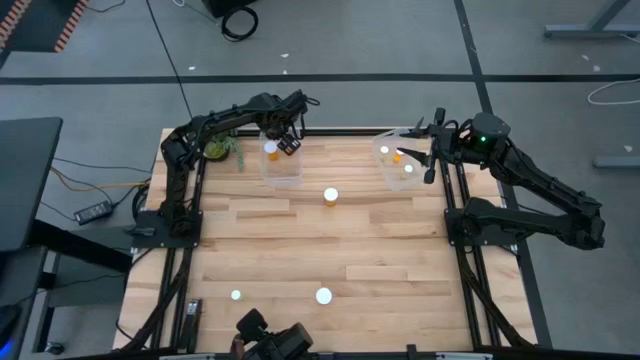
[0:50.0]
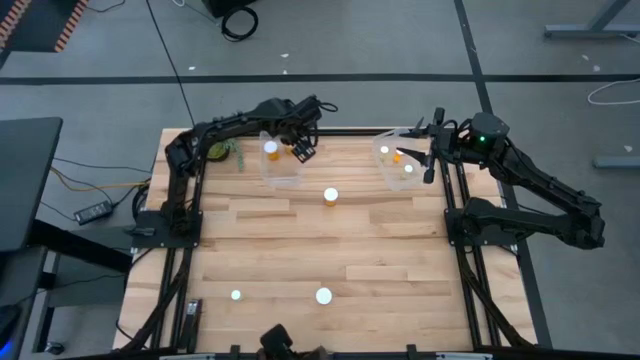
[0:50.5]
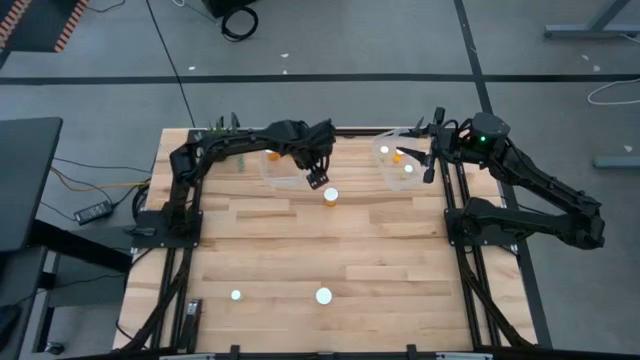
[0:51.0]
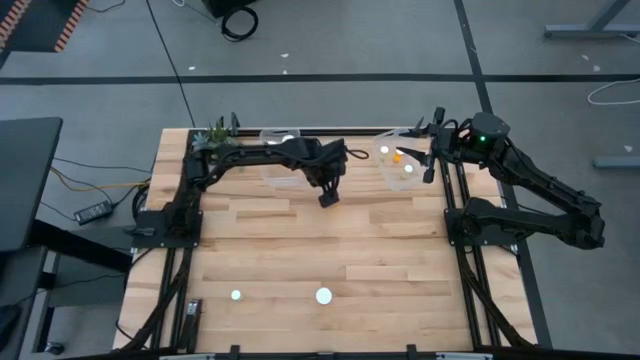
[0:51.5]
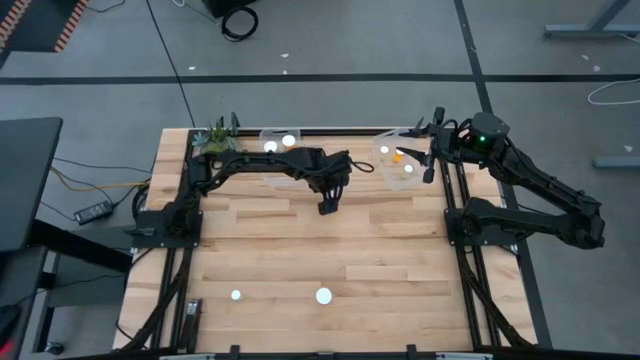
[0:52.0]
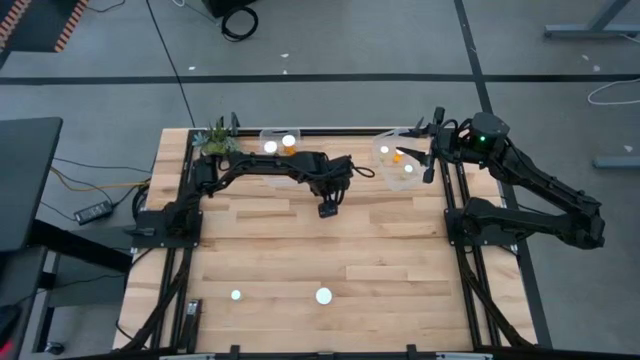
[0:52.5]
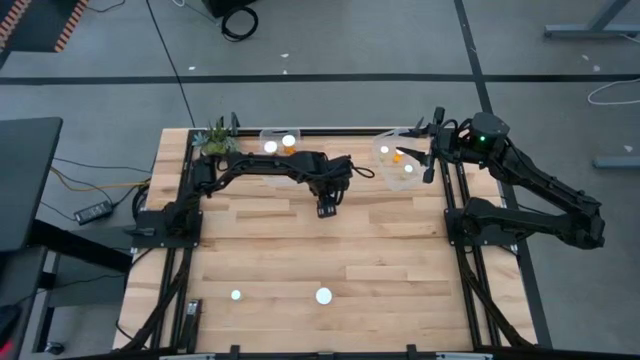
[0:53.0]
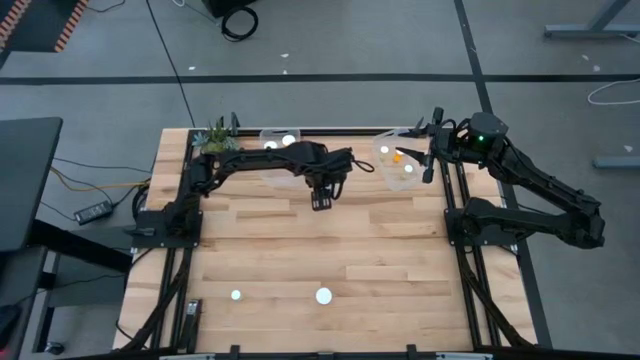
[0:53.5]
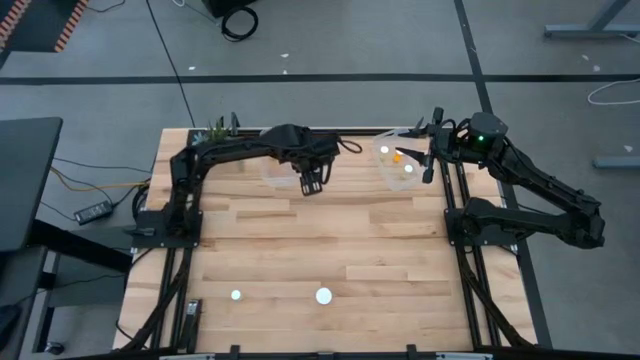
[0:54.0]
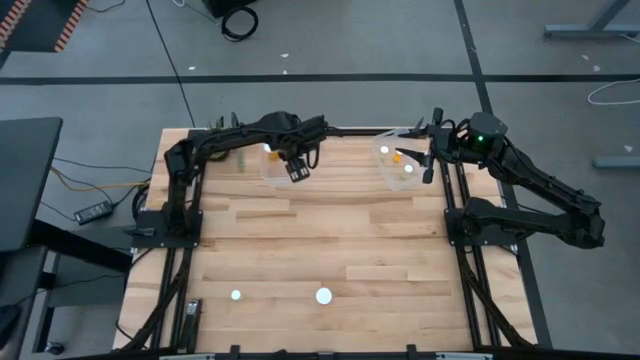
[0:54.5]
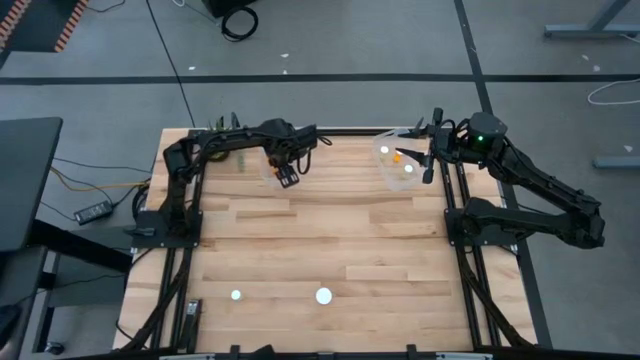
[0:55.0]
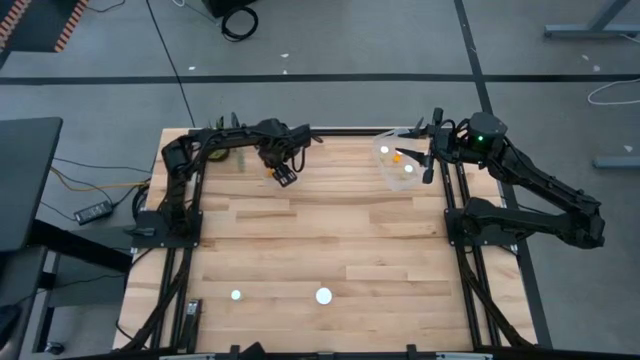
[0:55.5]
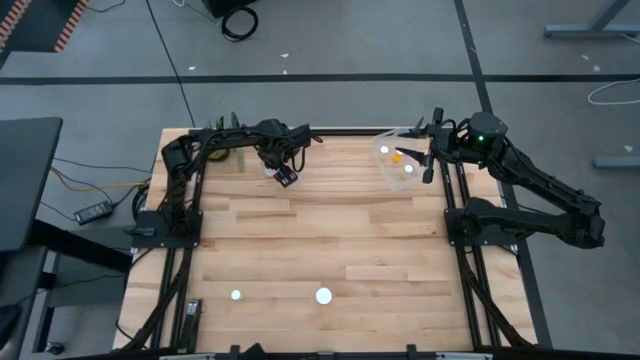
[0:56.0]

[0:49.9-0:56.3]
Task: Pick and place medicine bottles into bin by pill shape (circle, oval)
Put the big pill bottle into the left transparent bin

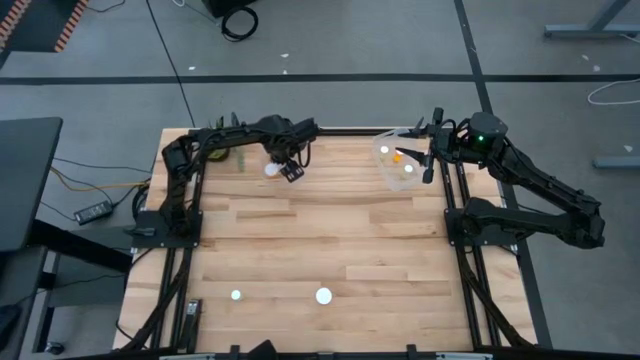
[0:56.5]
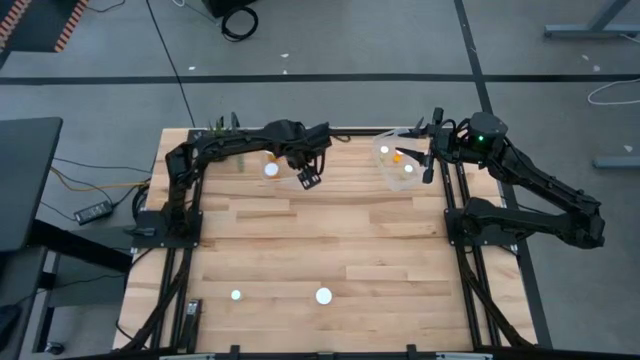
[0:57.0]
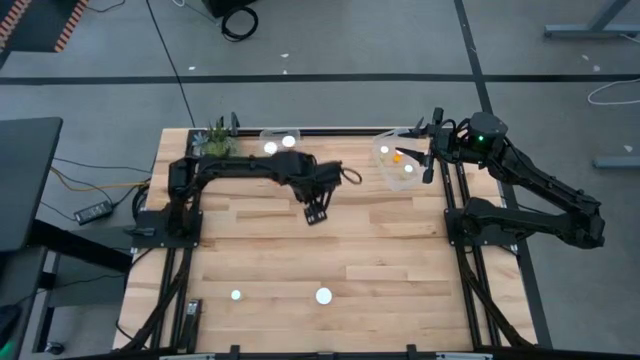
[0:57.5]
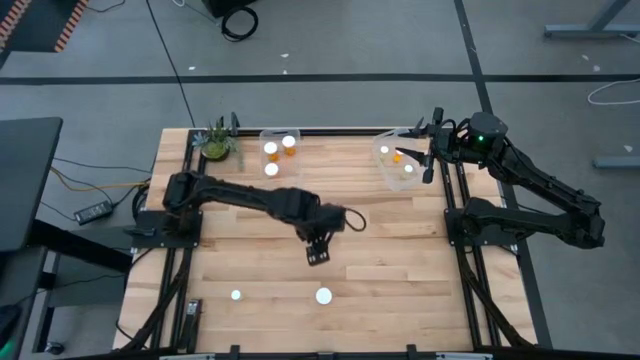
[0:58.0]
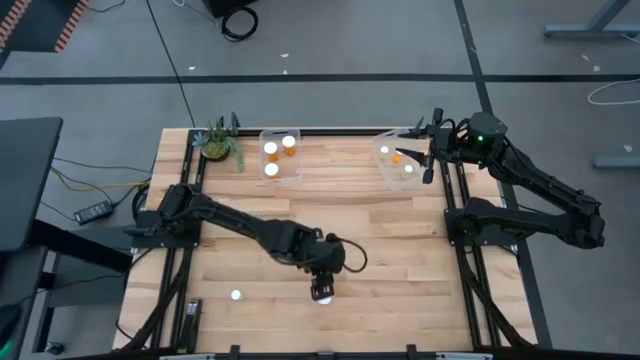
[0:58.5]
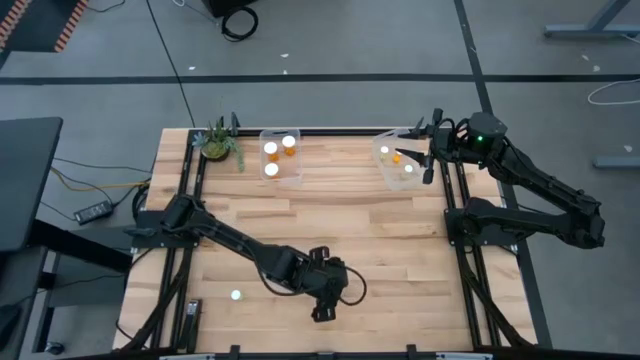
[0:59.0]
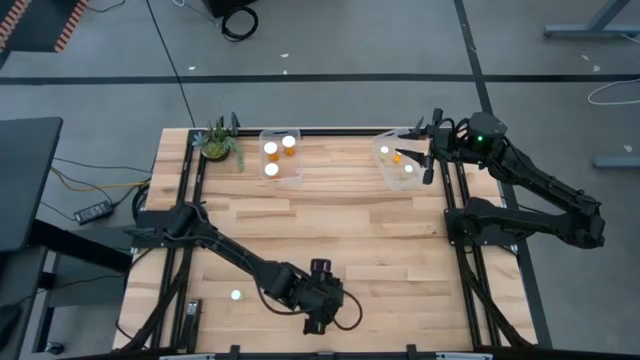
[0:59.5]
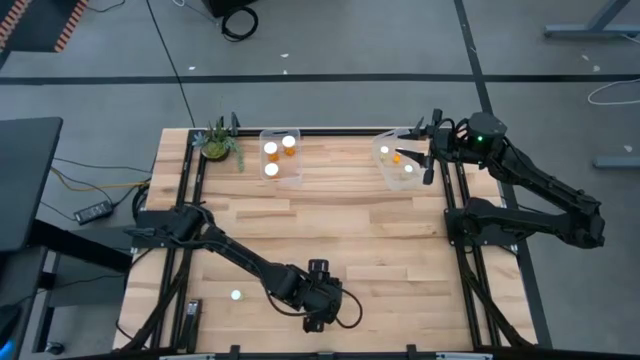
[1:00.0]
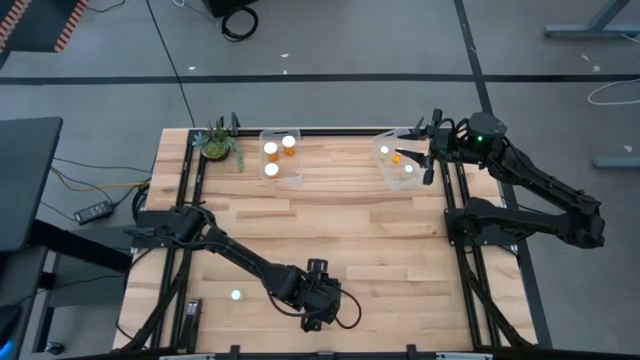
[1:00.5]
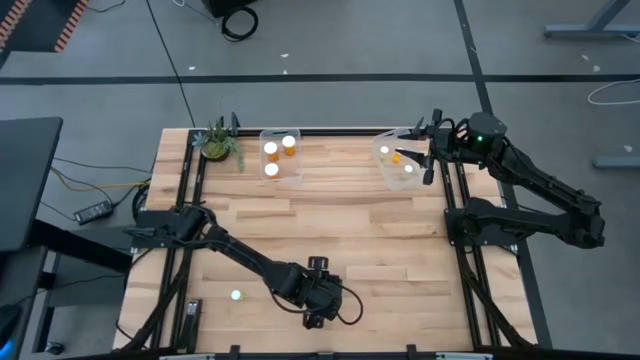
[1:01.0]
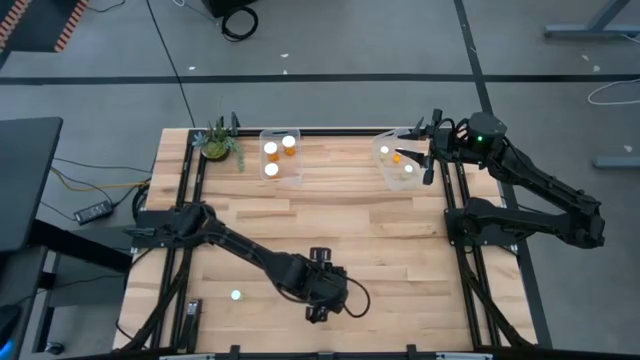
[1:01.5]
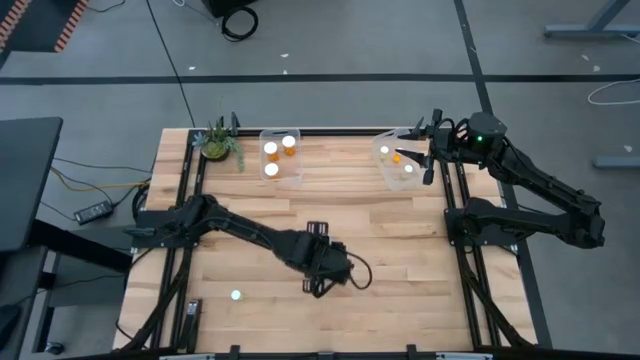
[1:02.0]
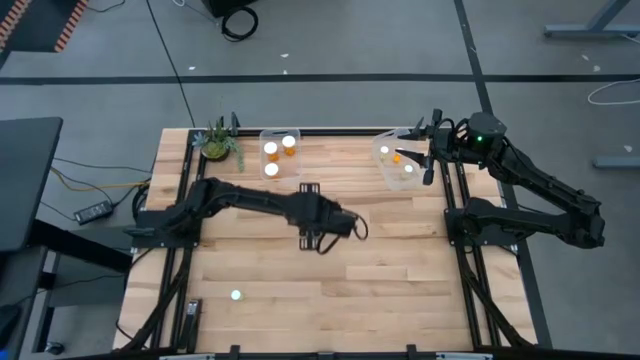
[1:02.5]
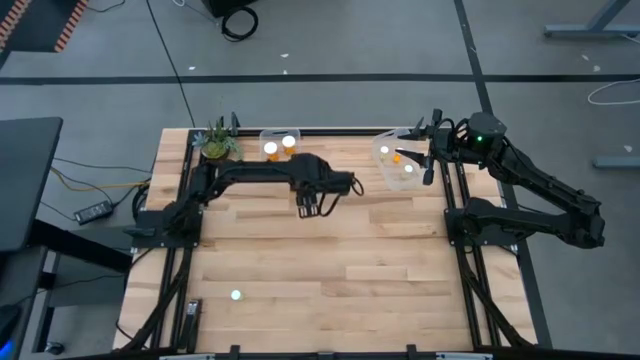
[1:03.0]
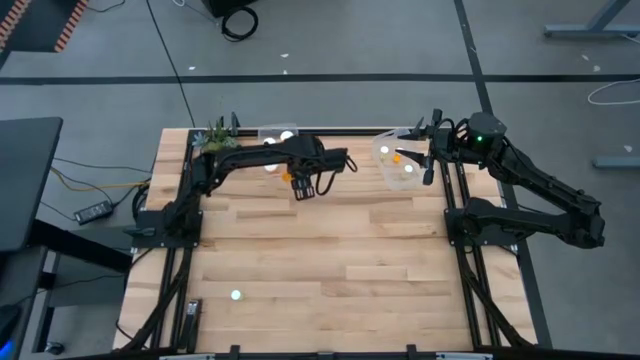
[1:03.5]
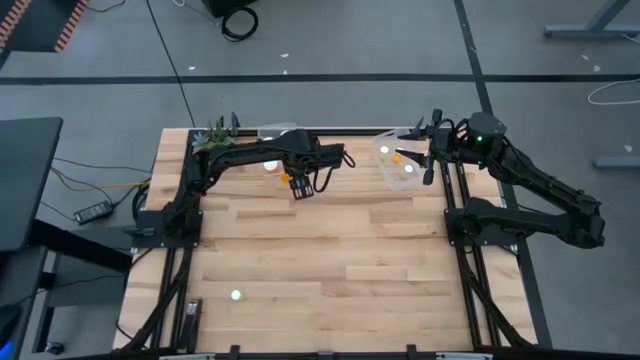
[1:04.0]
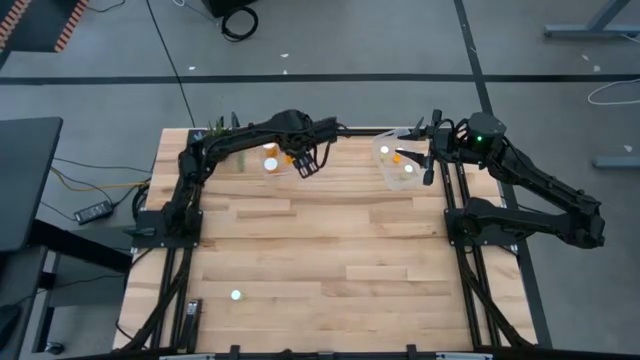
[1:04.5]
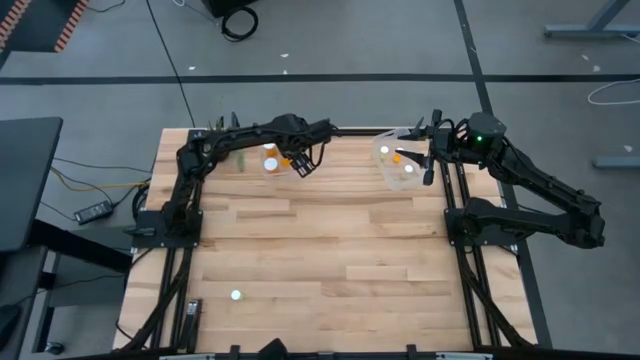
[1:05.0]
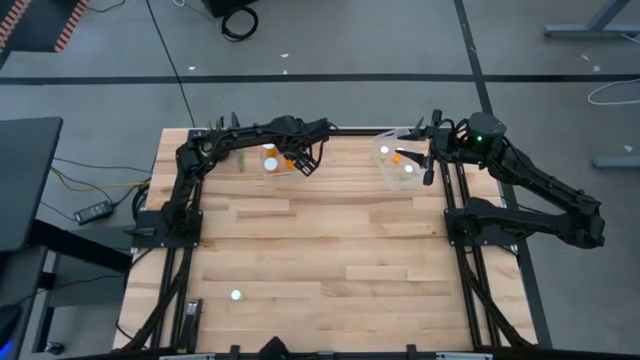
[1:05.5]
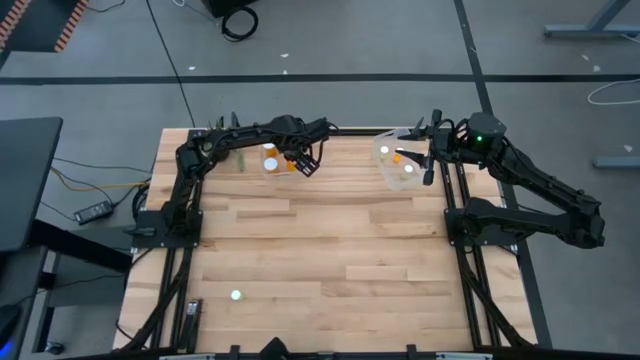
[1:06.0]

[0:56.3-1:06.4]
Put the big pill bottle into the left transparent bin

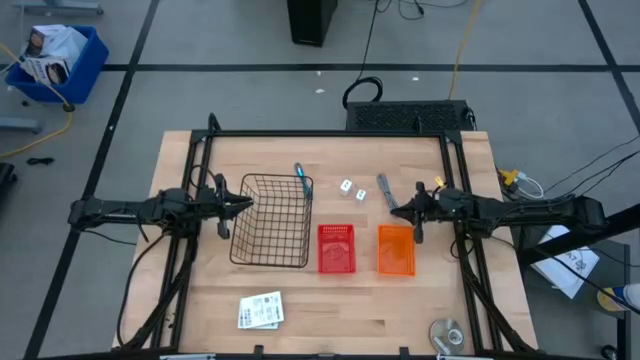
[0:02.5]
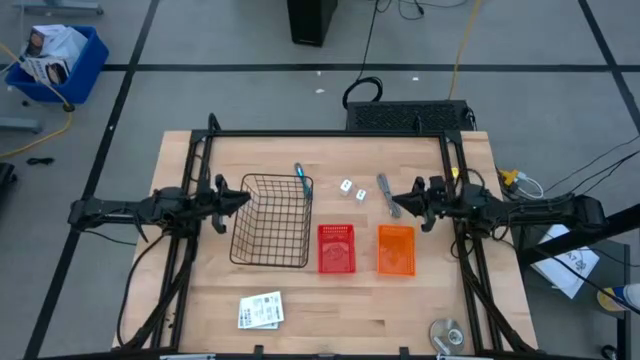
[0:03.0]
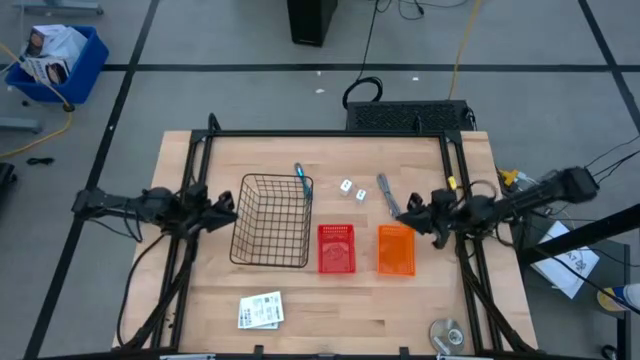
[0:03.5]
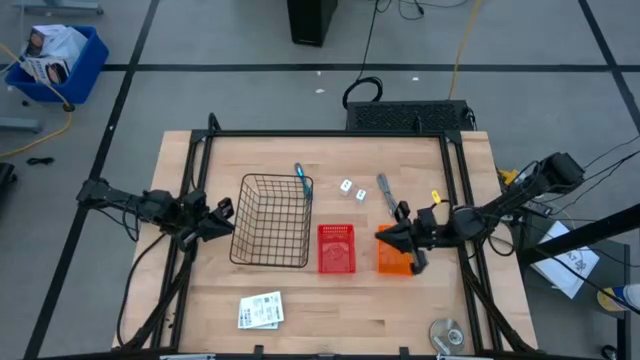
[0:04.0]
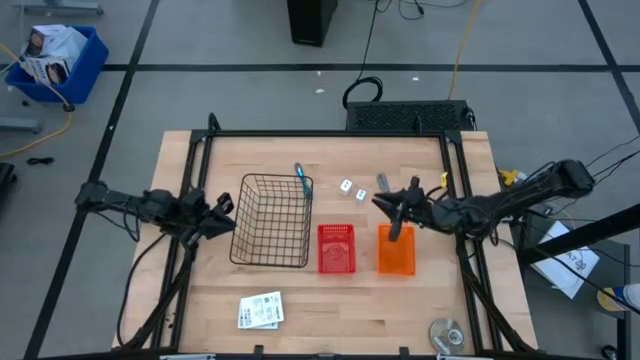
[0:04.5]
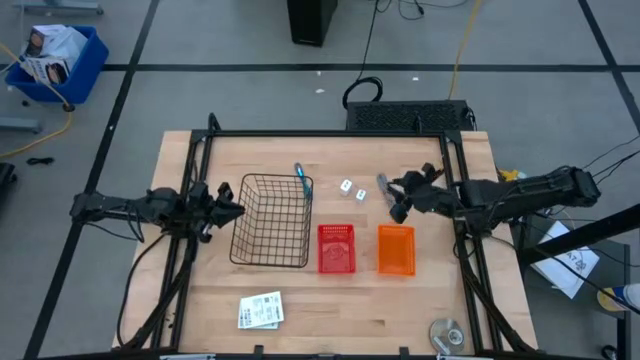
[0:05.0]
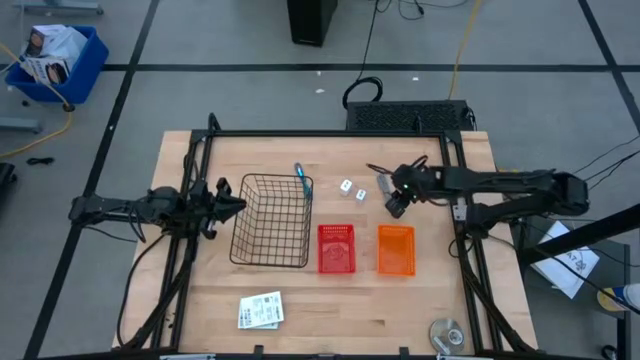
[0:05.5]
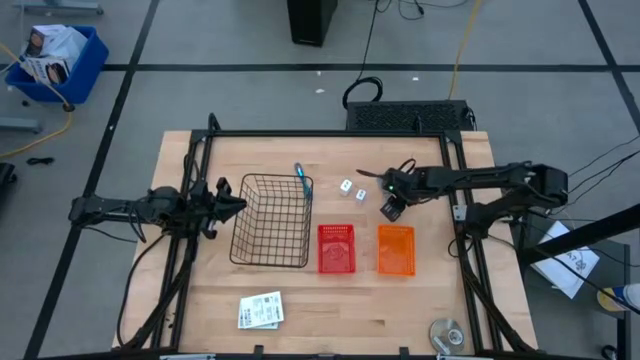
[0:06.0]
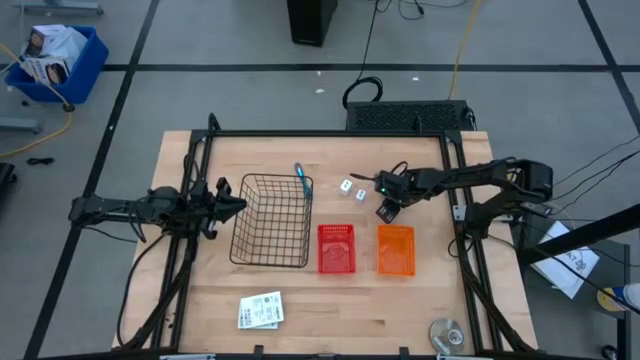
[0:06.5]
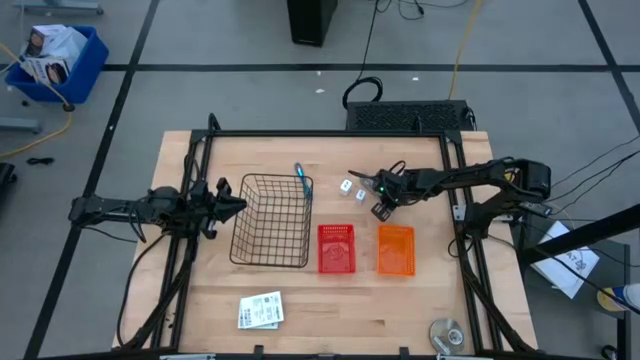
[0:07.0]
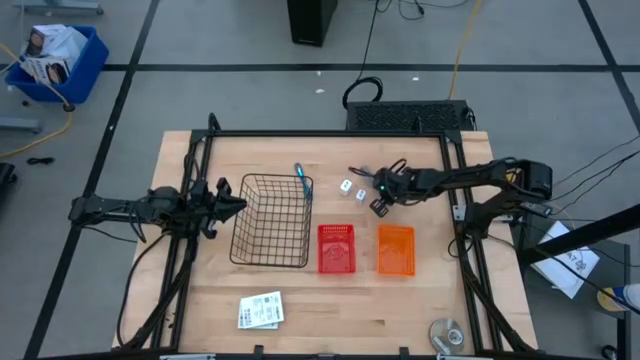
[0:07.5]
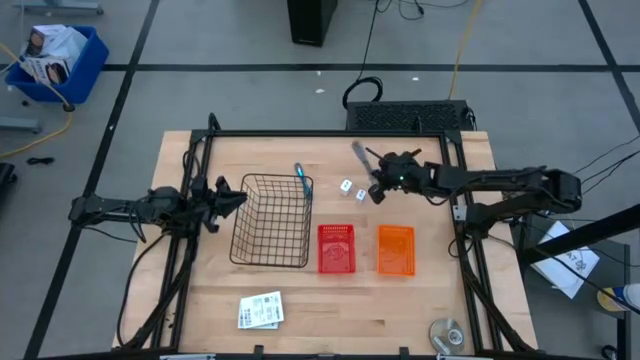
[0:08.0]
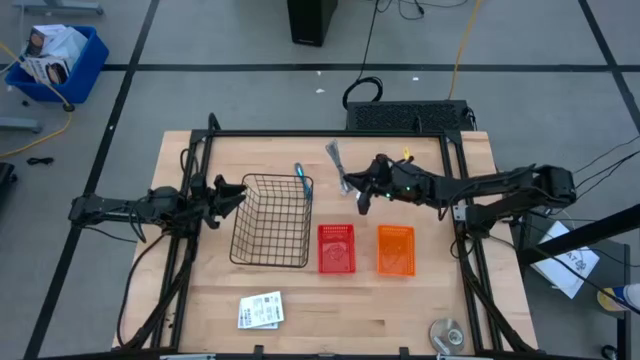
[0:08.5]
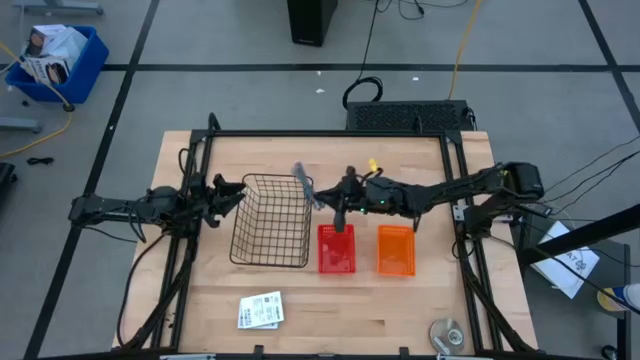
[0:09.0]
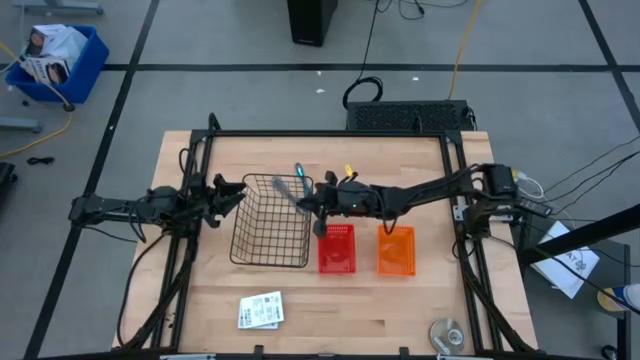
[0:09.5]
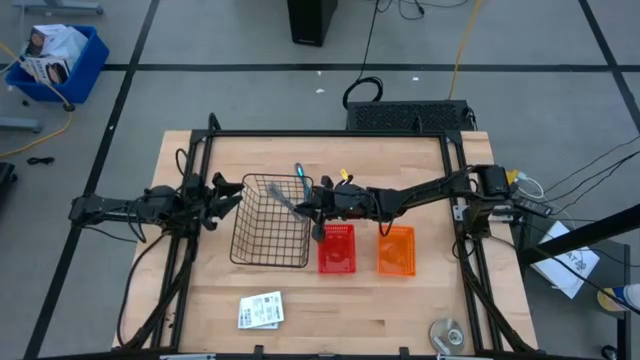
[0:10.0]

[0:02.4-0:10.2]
Task: Pick and place items into bin
Put the white USB cable into the black basket
